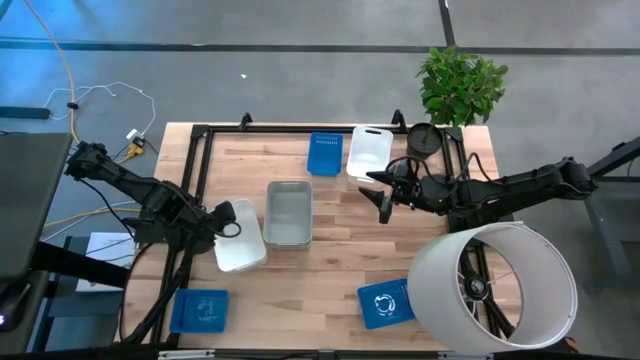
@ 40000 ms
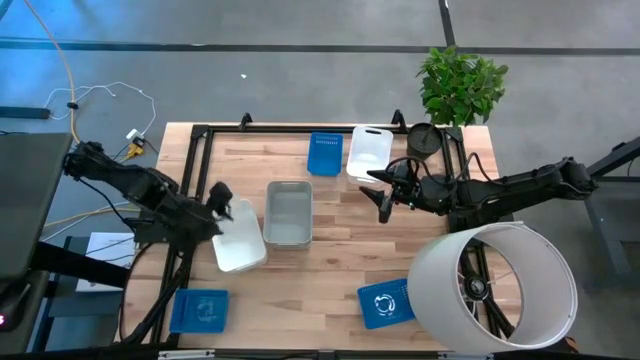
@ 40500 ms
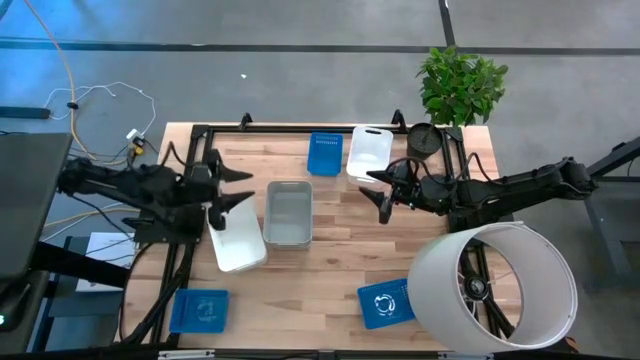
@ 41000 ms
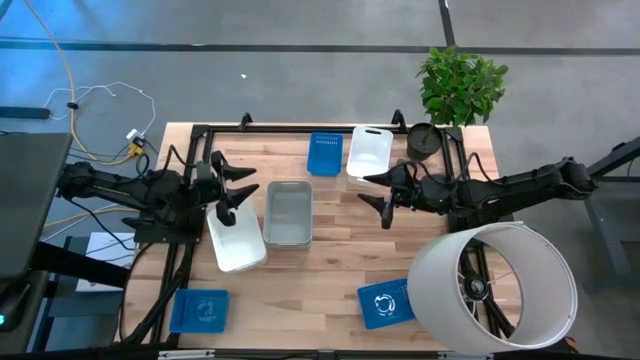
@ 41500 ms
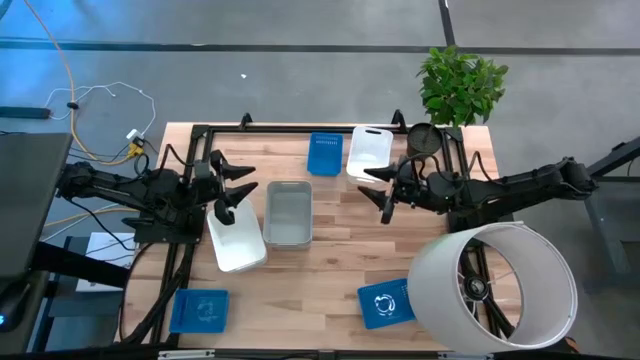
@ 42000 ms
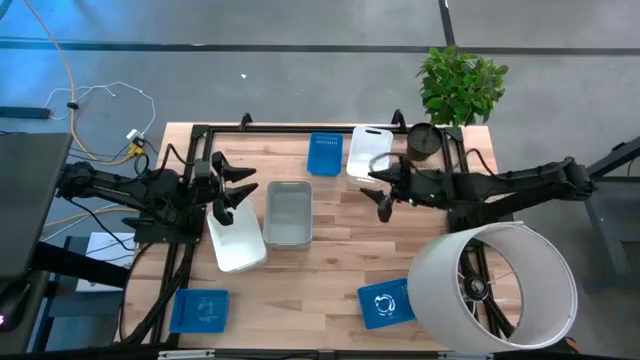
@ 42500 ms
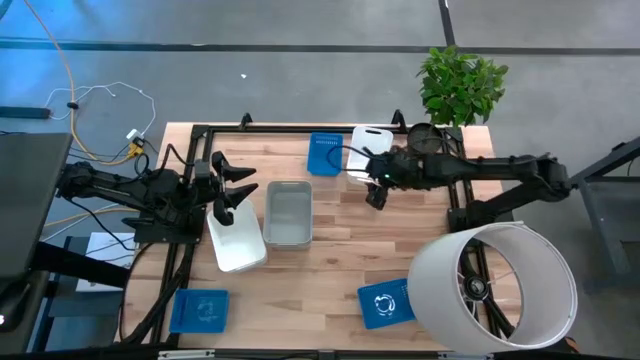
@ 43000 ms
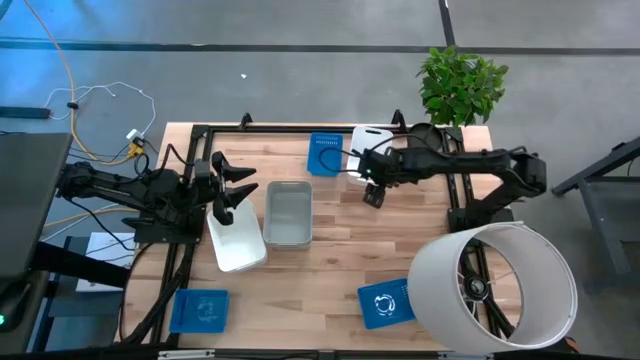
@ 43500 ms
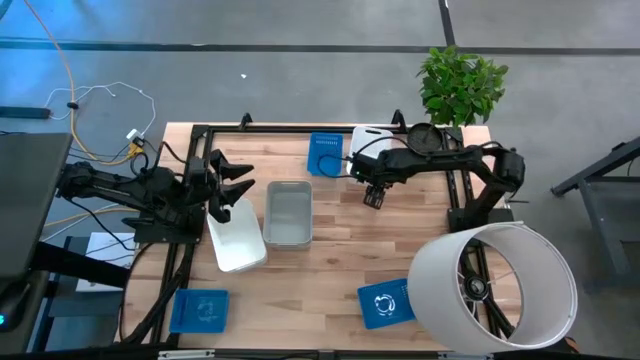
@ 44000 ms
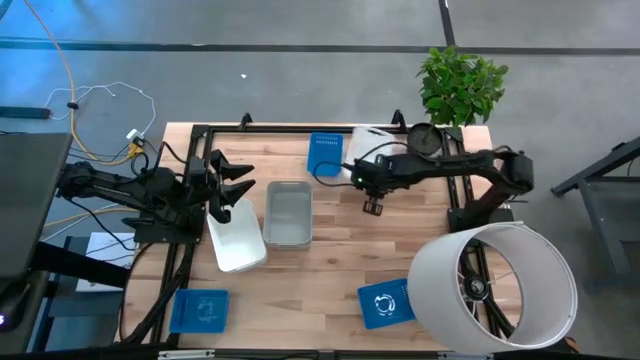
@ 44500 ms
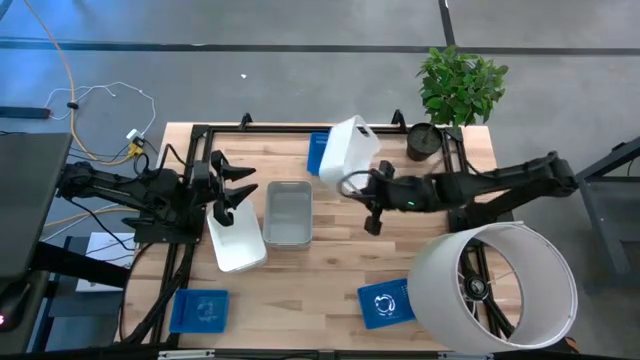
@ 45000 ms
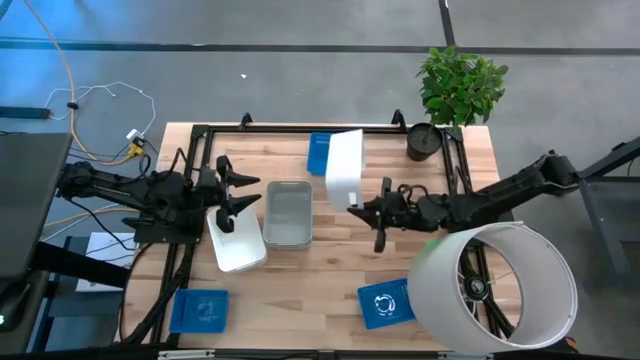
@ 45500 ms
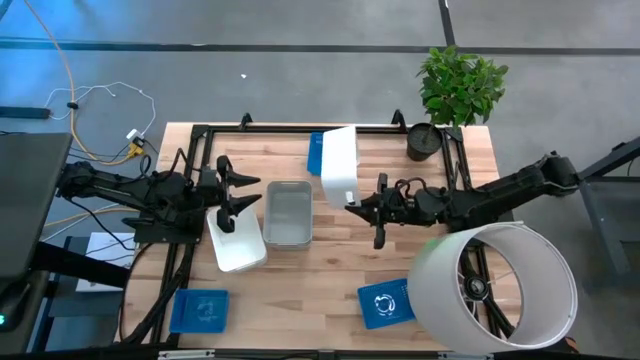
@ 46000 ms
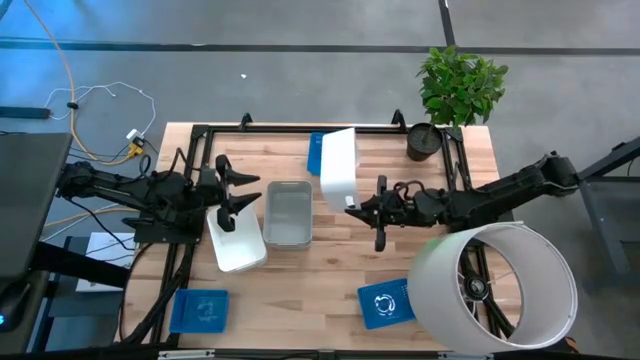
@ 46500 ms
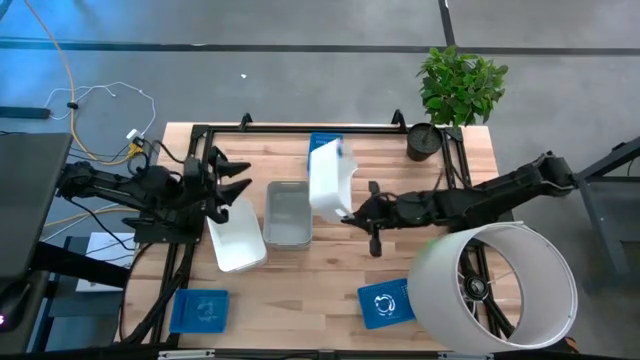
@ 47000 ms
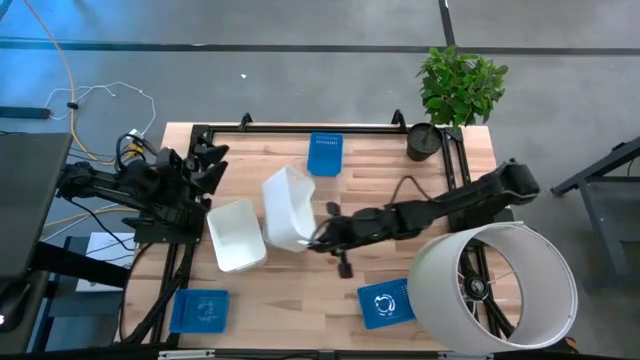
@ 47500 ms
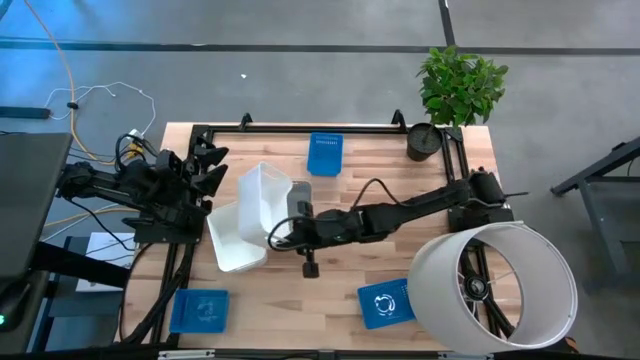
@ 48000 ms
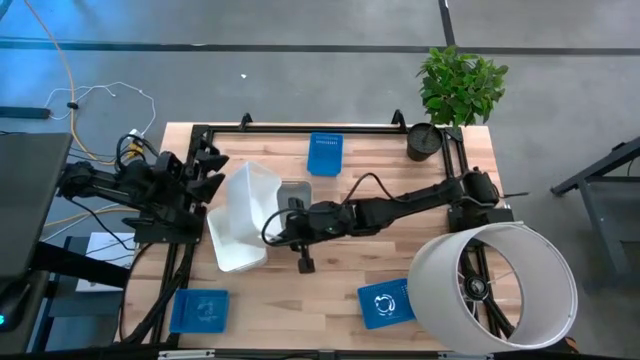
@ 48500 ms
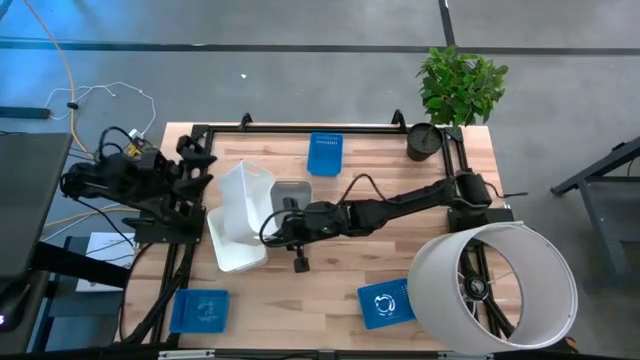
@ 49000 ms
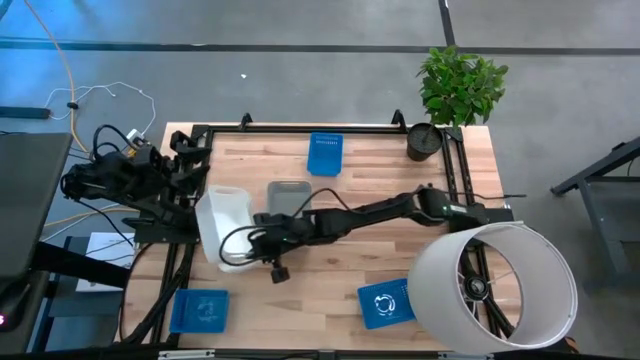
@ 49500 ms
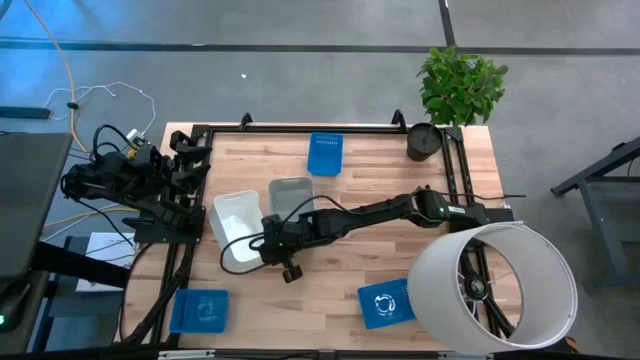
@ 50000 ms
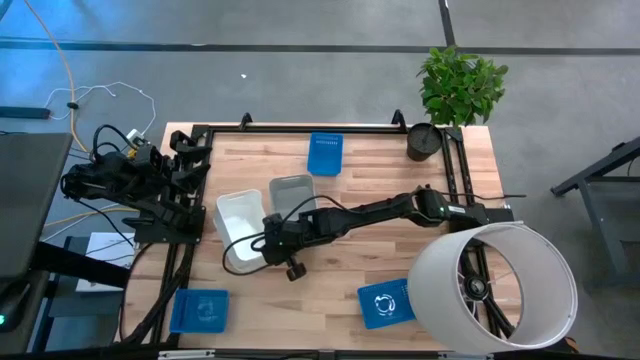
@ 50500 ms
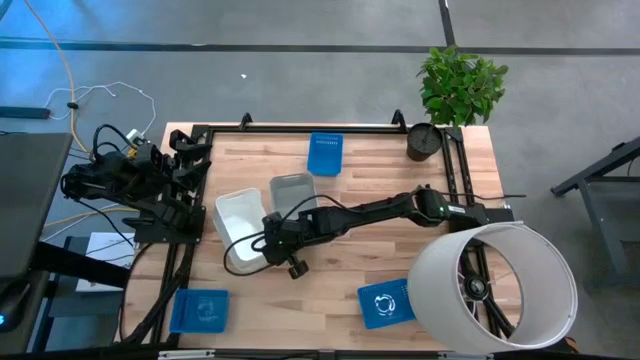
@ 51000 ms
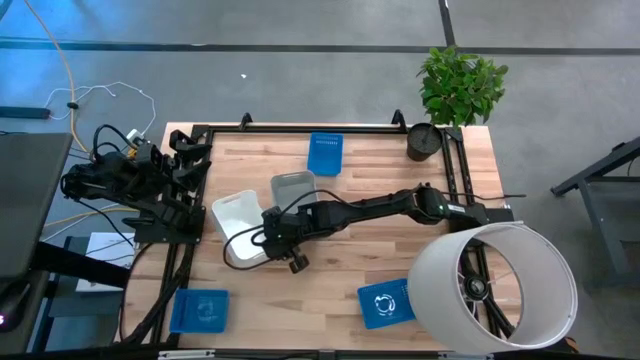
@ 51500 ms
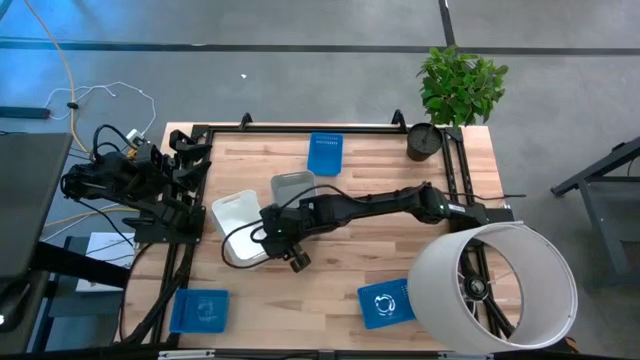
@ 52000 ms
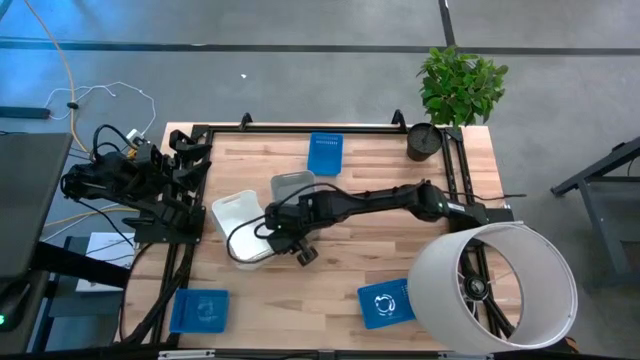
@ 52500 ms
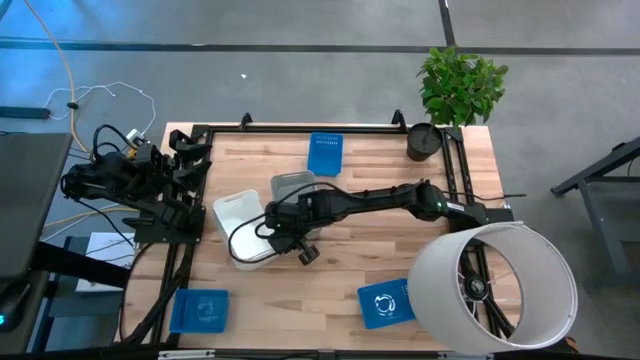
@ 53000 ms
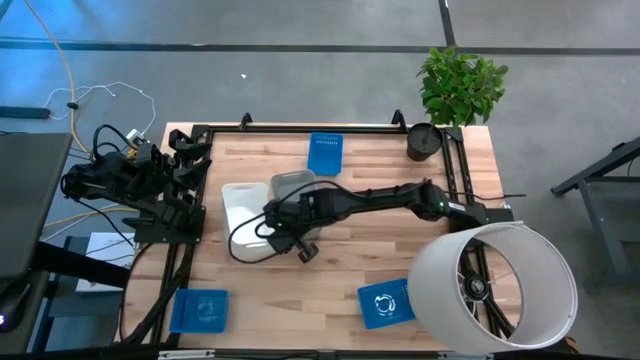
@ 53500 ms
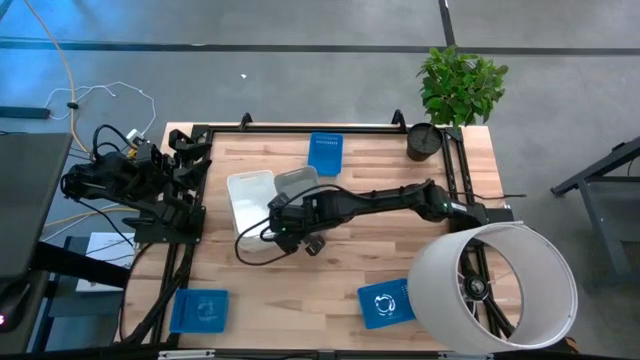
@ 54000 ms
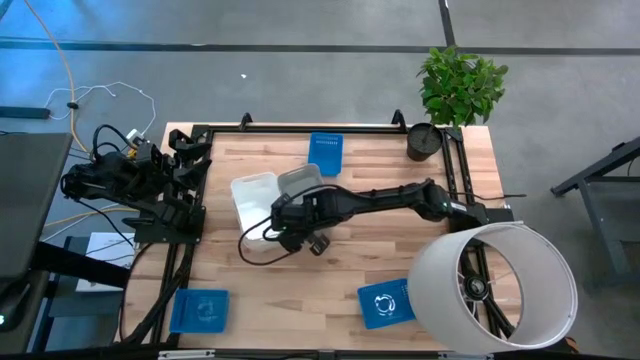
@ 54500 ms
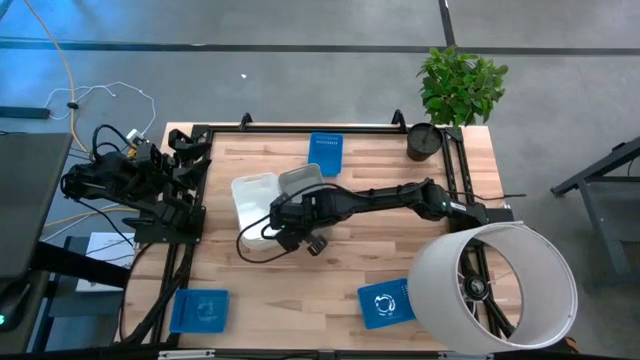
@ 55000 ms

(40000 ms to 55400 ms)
Stack the top white bin on top of the bottom white bins
